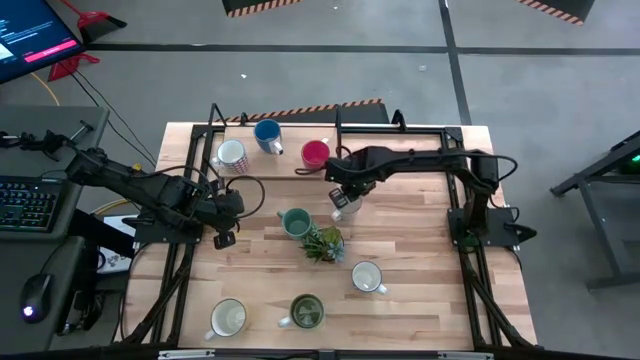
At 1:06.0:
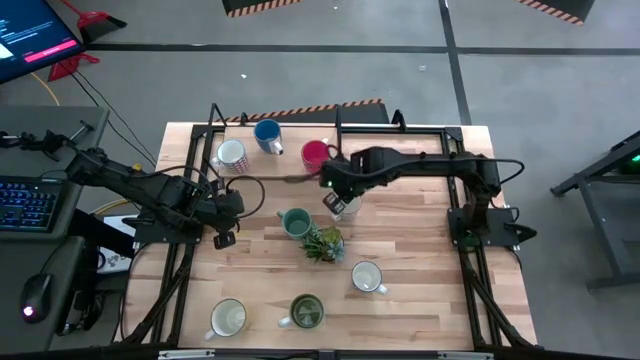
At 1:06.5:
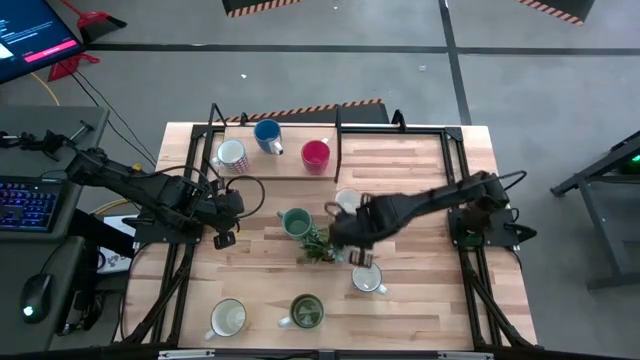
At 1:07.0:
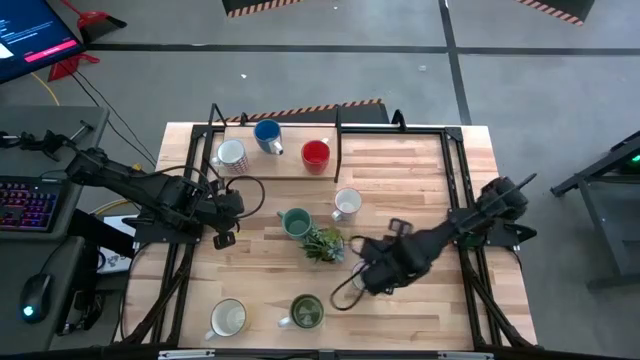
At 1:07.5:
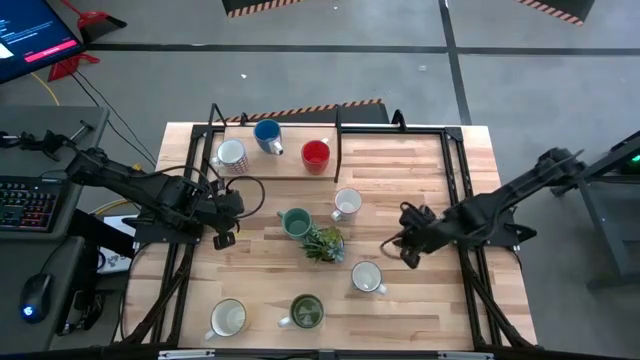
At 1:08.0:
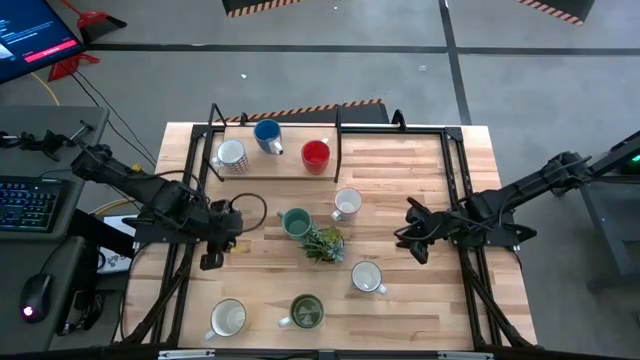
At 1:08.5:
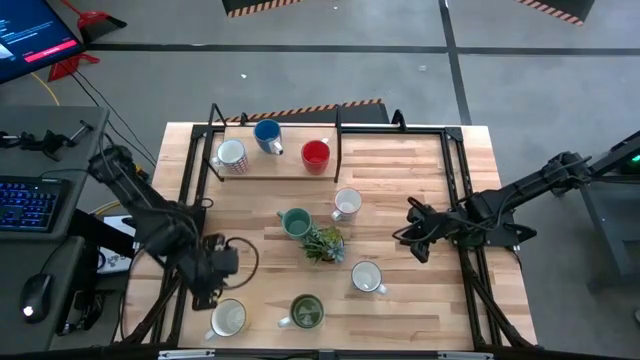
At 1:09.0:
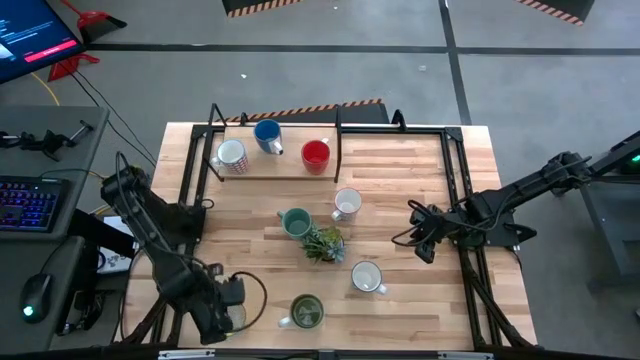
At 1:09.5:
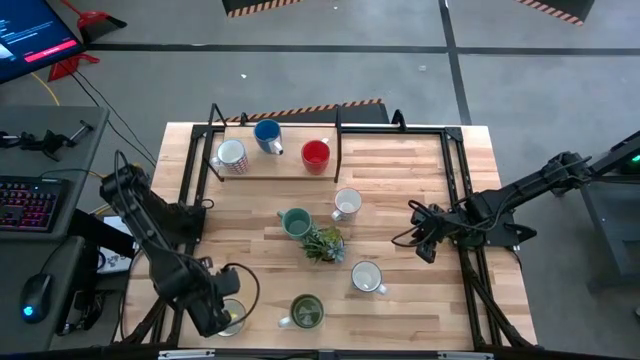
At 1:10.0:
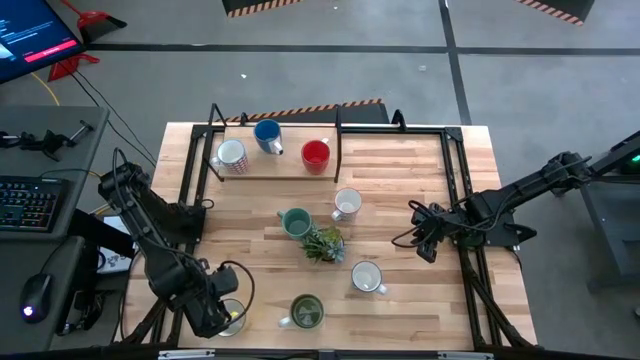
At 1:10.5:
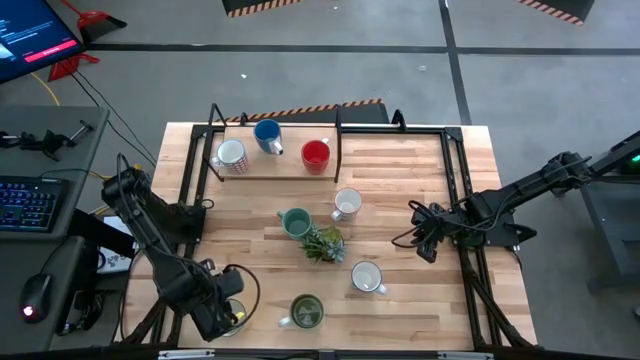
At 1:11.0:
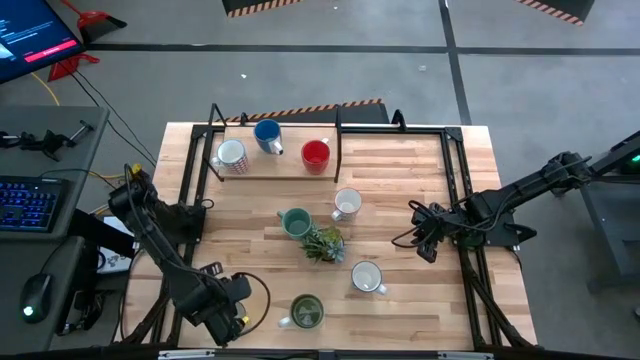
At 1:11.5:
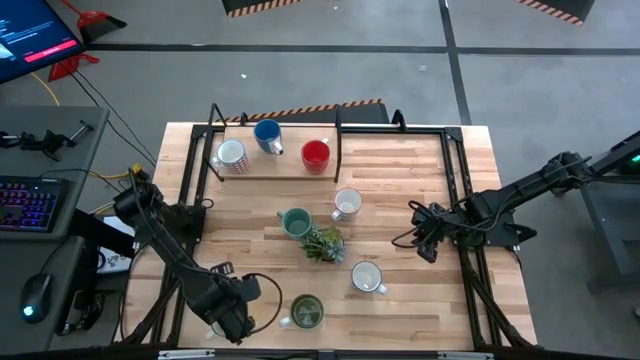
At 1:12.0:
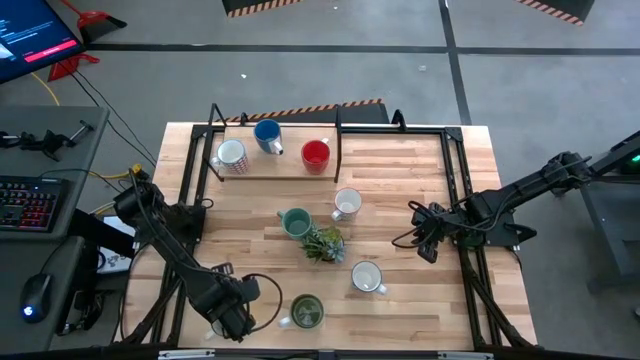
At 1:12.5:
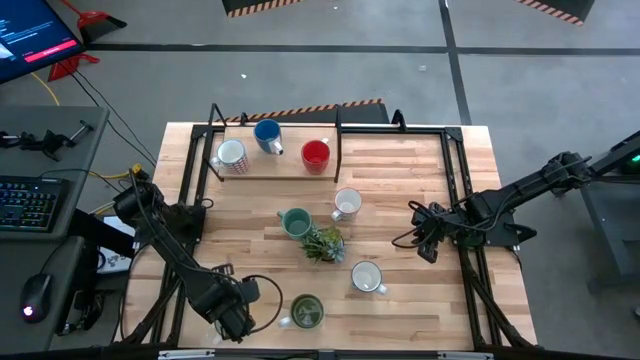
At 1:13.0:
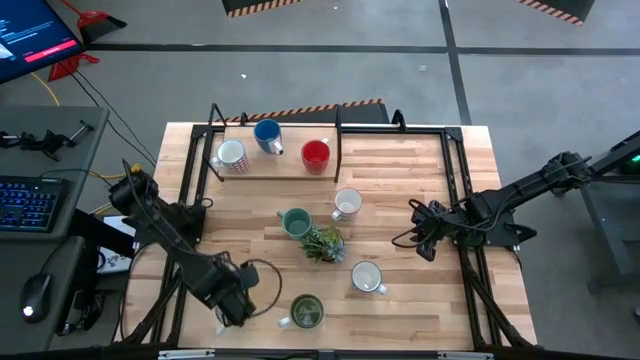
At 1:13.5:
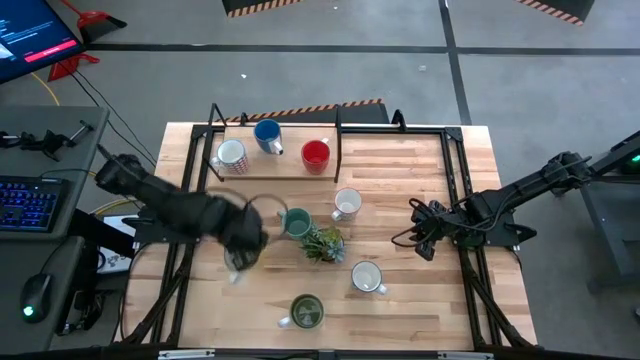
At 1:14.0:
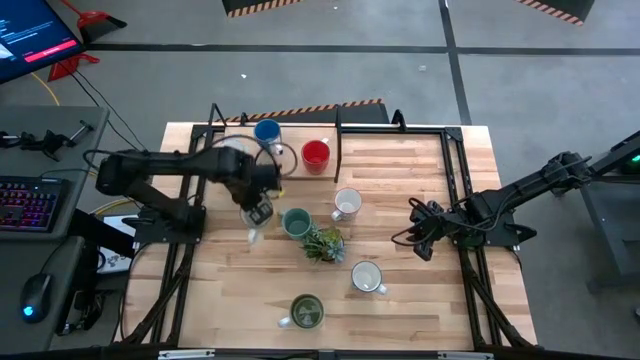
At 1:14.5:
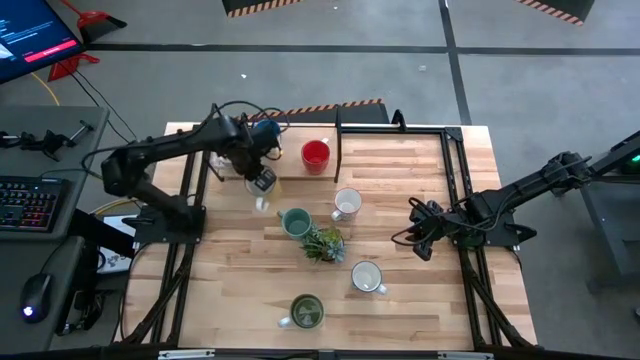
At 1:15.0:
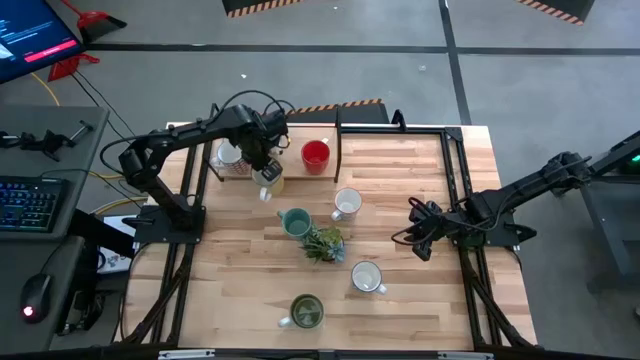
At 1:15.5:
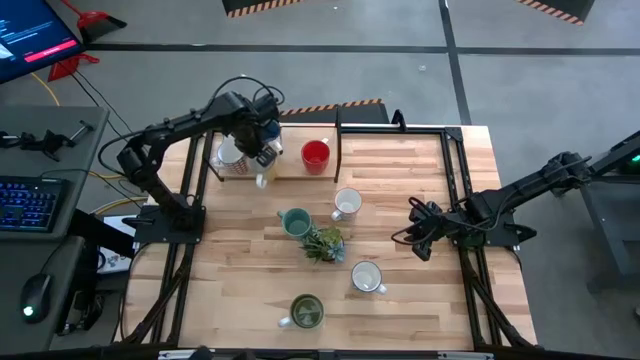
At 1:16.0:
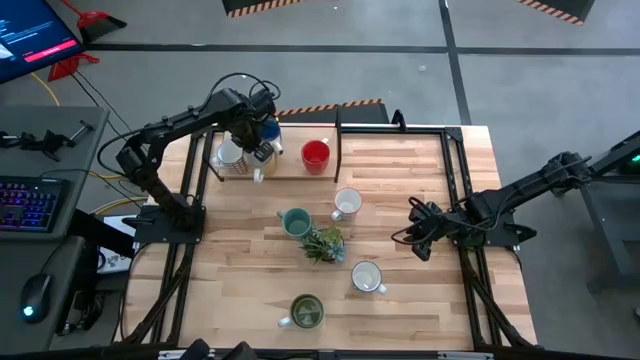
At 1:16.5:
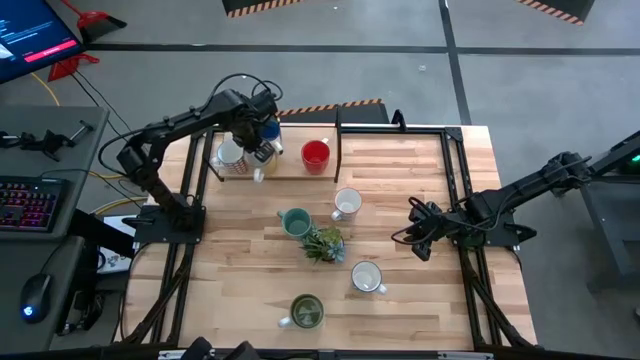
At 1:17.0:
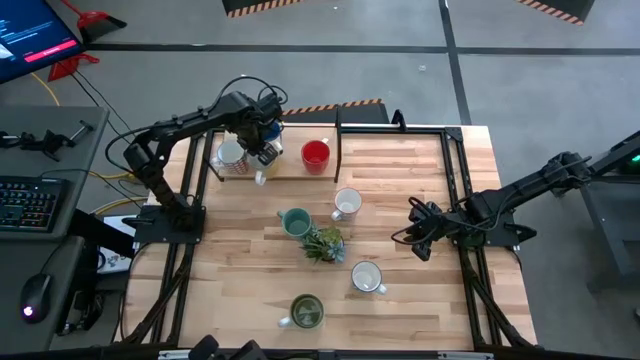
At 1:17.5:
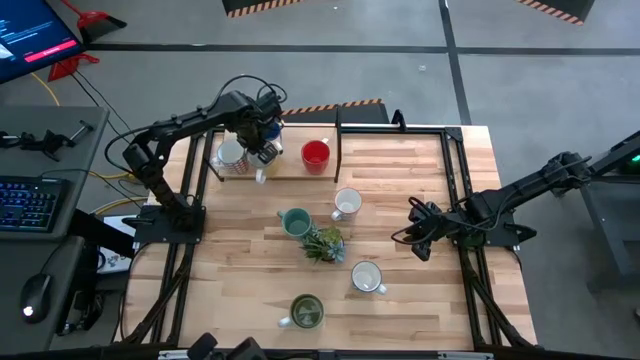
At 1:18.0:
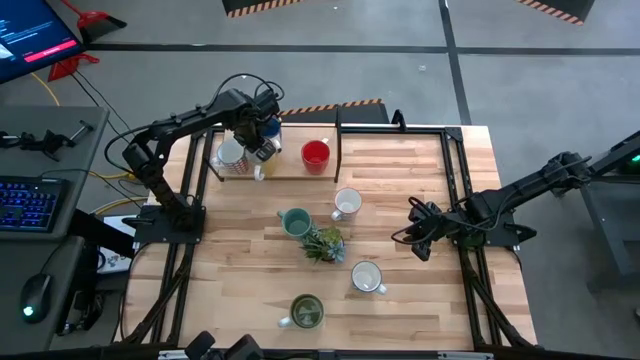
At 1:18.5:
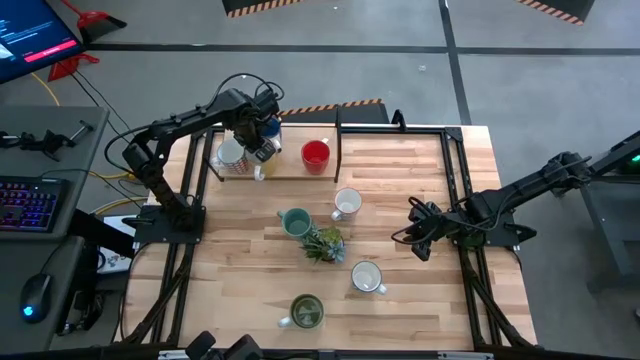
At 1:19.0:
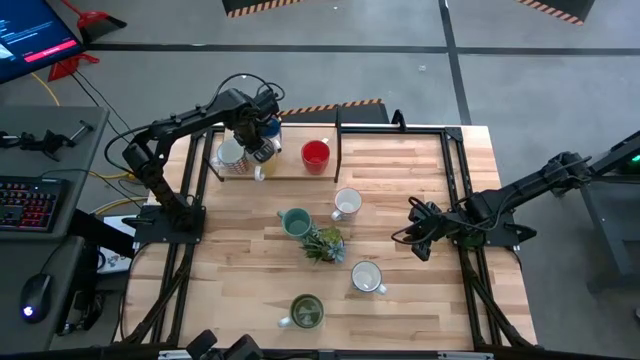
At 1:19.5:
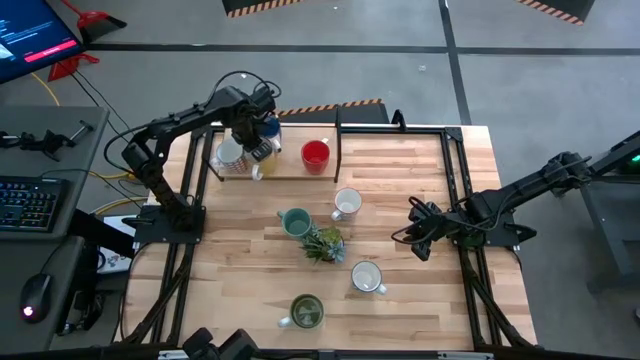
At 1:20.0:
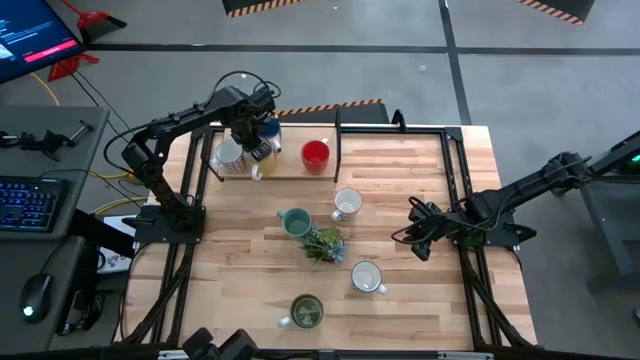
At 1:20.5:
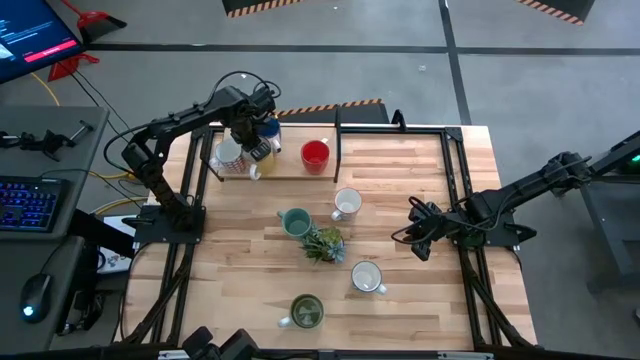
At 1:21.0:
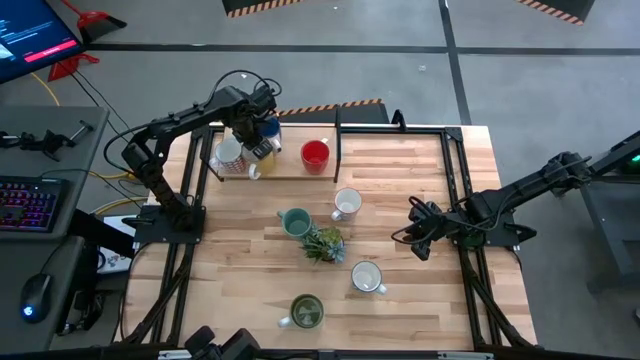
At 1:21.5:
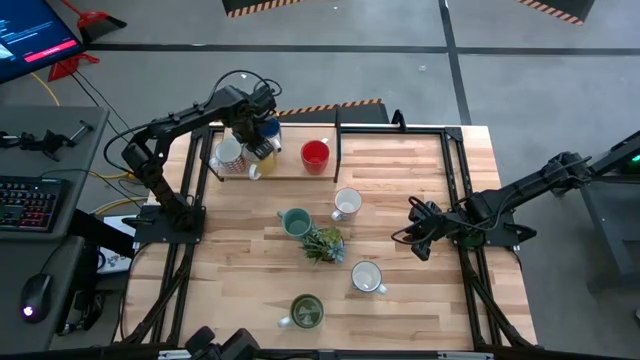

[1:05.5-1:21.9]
Task: Place coffee mugs
Put the yellow mug on the shelf

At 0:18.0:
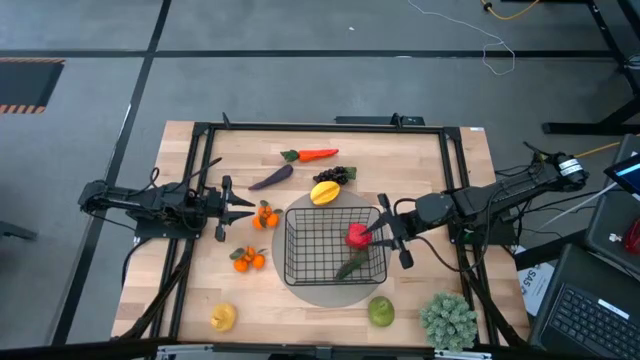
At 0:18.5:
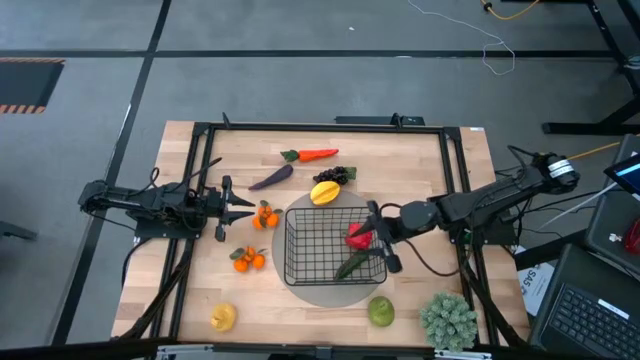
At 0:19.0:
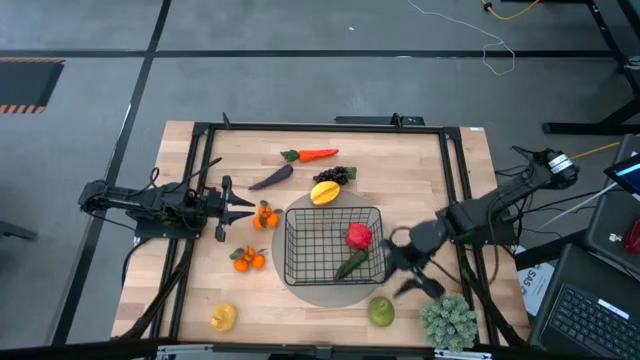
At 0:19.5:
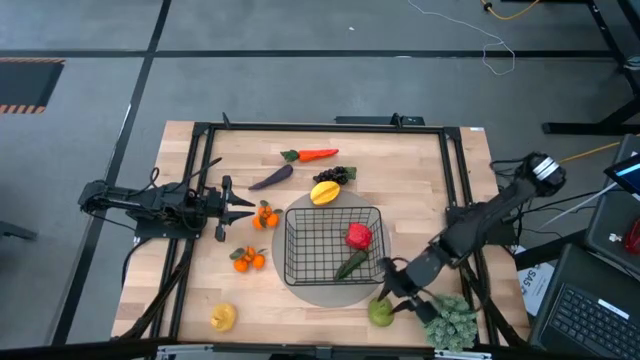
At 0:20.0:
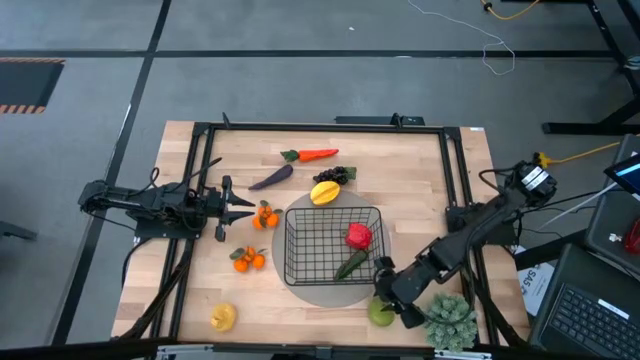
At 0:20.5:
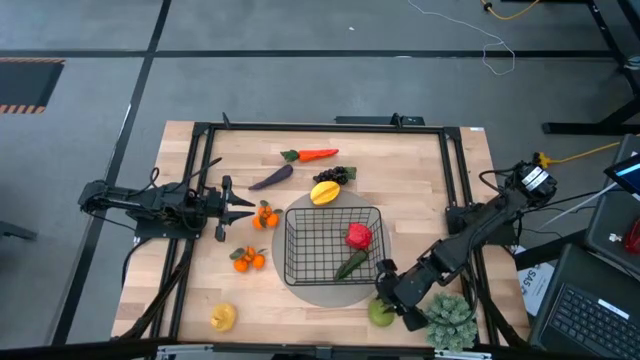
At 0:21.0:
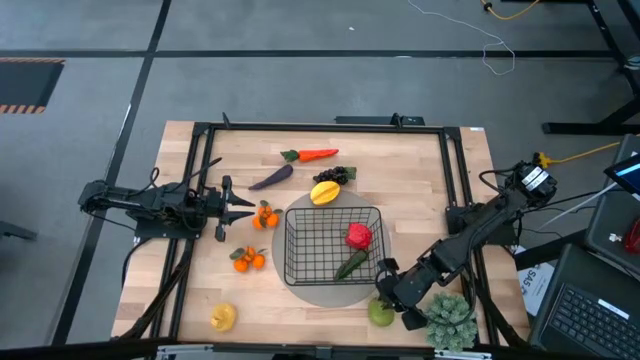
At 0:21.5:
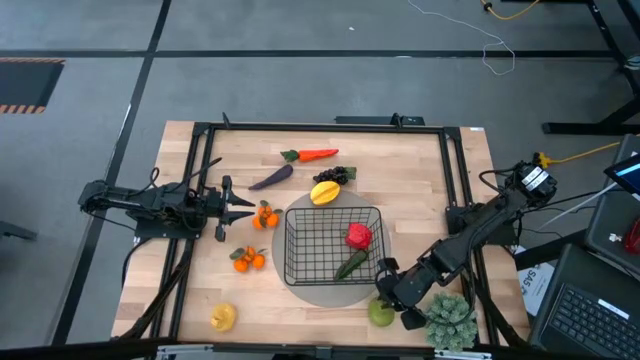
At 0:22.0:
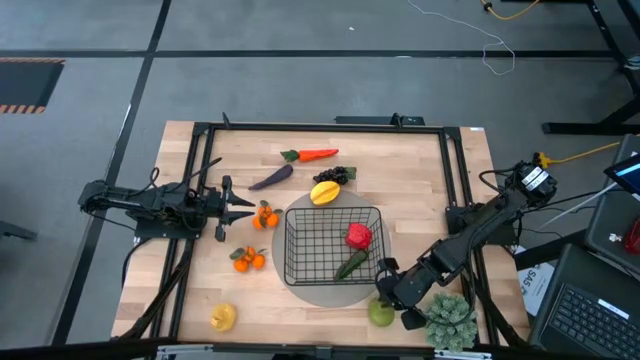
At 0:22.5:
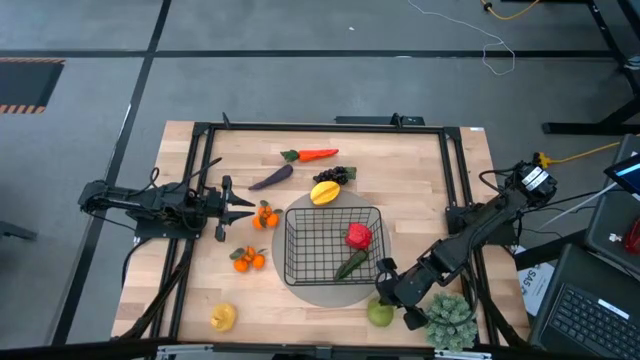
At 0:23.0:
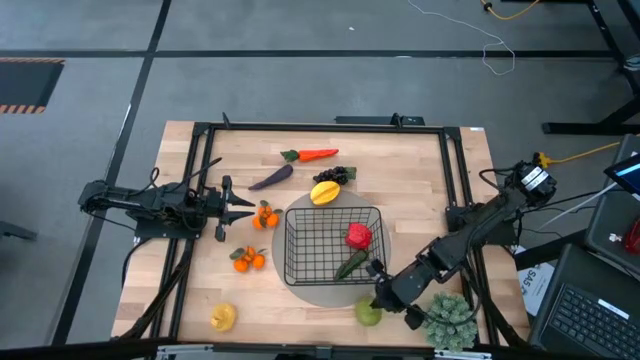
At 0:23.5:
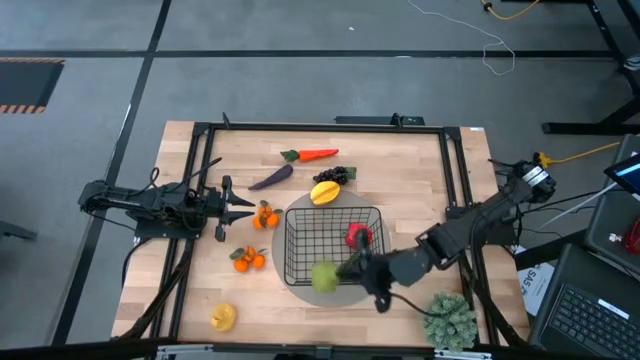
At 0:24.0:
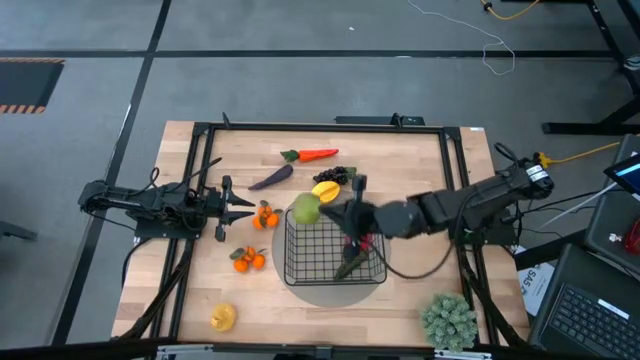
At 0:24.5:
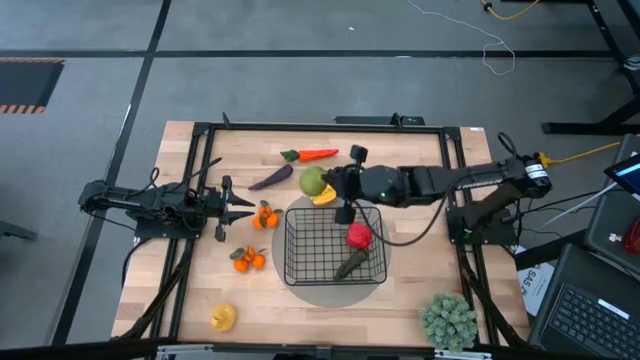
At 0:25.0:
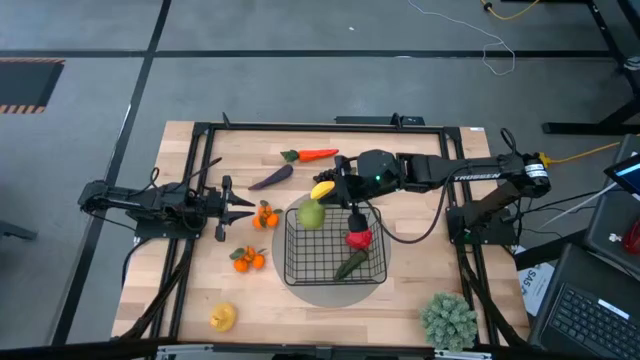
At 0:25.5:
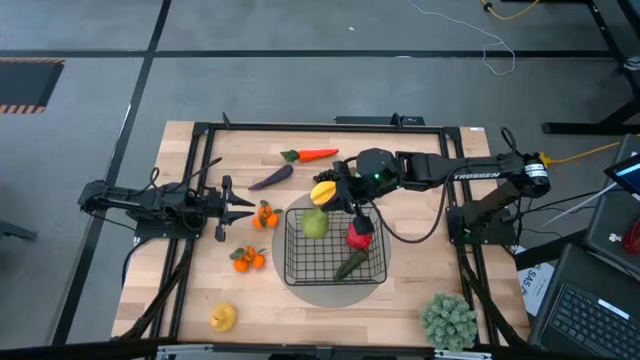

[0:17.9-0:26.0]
Task: Build produce basket
Put the green pear into the black wire basket
